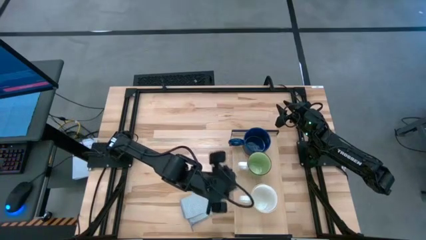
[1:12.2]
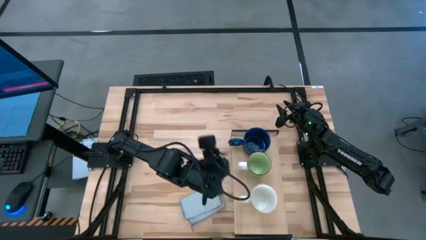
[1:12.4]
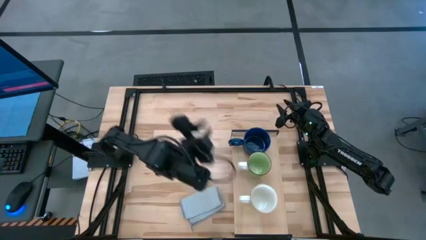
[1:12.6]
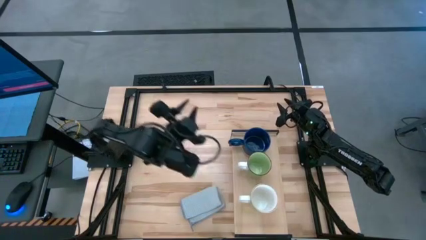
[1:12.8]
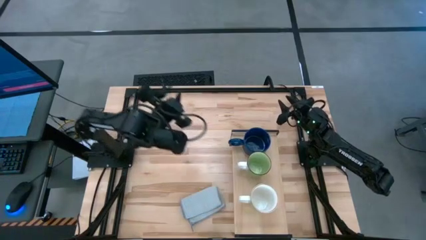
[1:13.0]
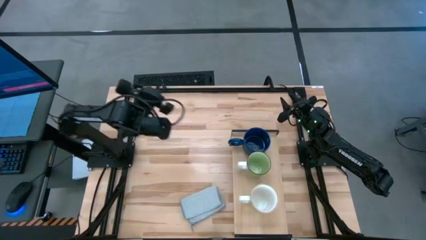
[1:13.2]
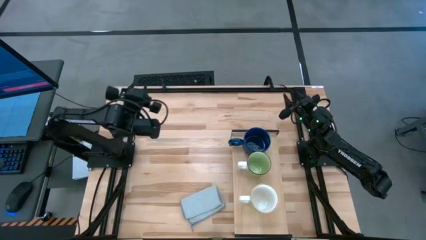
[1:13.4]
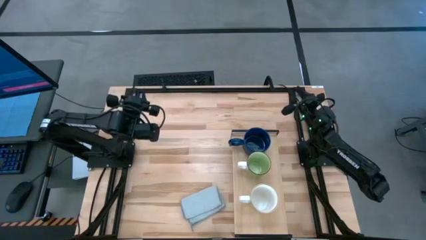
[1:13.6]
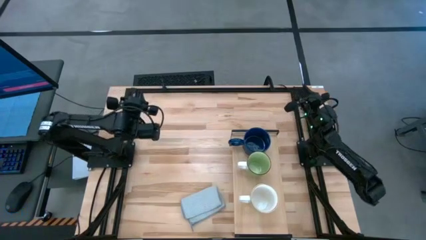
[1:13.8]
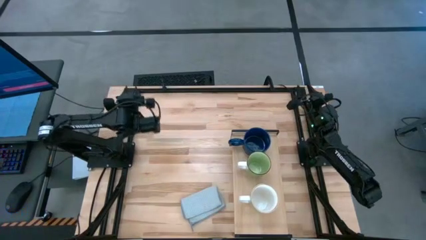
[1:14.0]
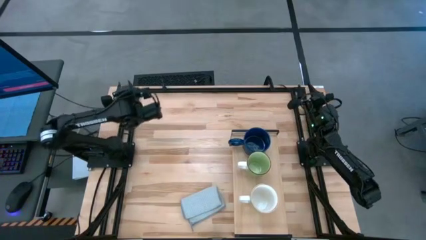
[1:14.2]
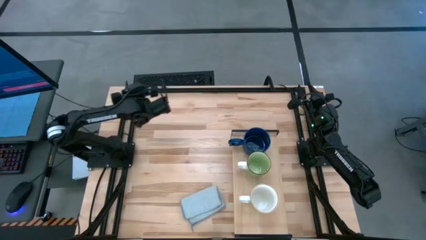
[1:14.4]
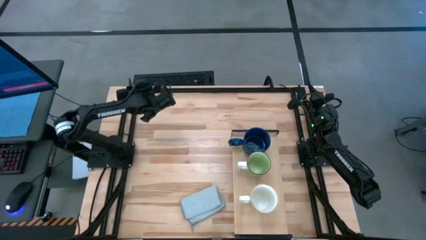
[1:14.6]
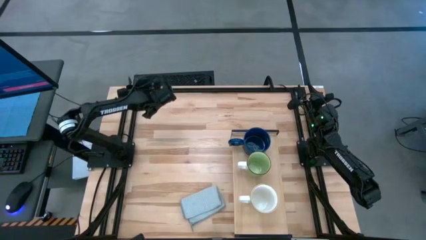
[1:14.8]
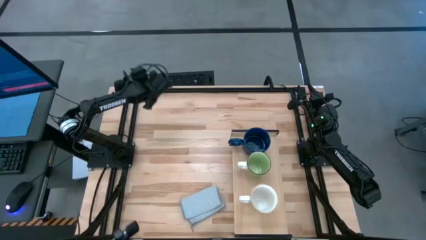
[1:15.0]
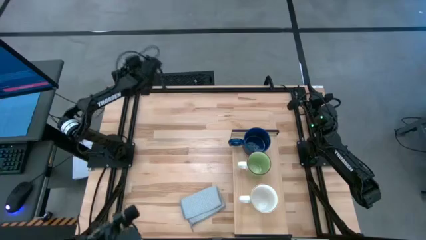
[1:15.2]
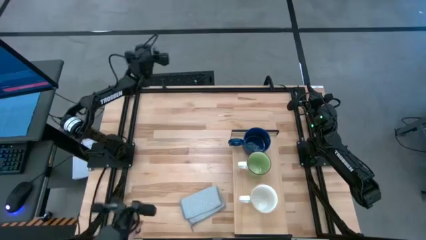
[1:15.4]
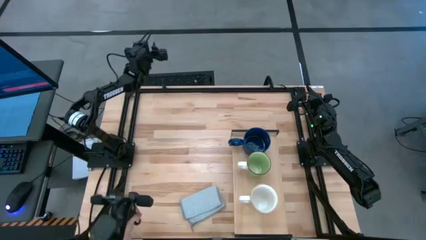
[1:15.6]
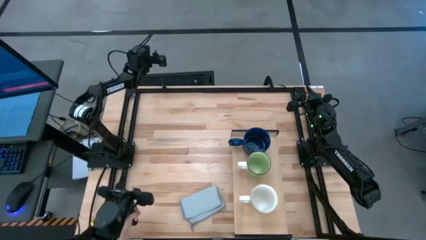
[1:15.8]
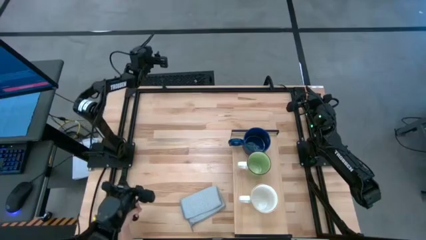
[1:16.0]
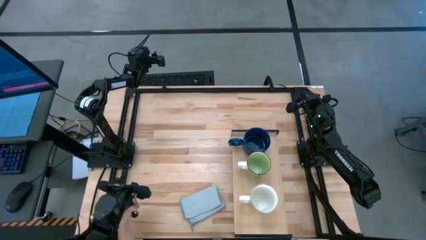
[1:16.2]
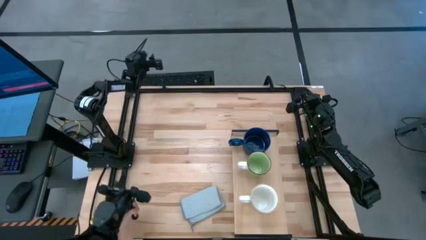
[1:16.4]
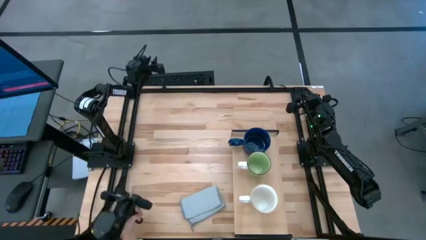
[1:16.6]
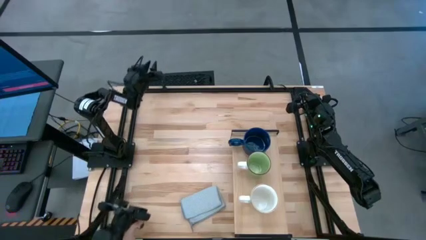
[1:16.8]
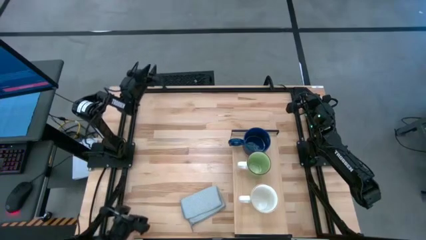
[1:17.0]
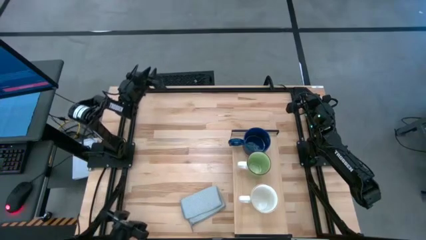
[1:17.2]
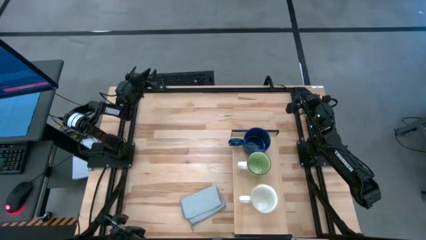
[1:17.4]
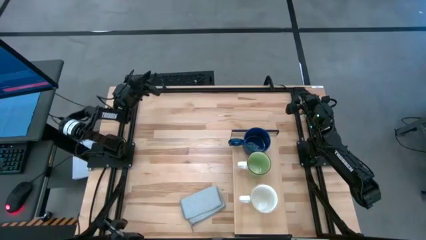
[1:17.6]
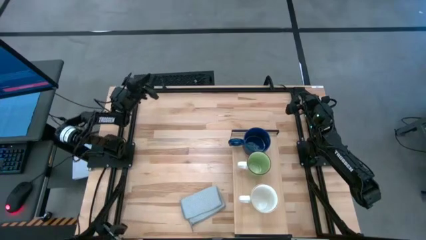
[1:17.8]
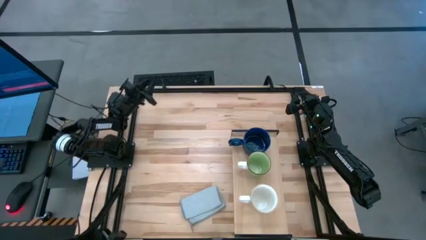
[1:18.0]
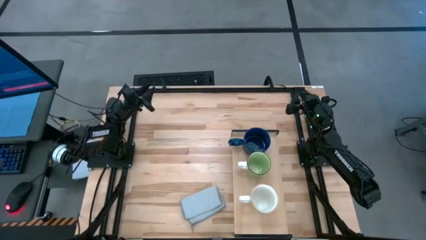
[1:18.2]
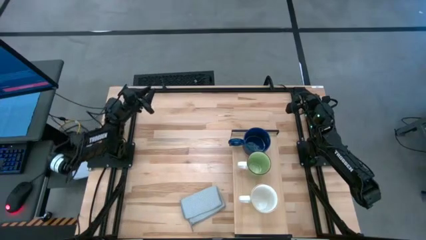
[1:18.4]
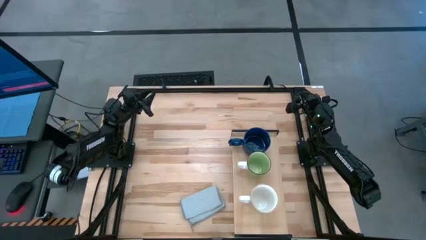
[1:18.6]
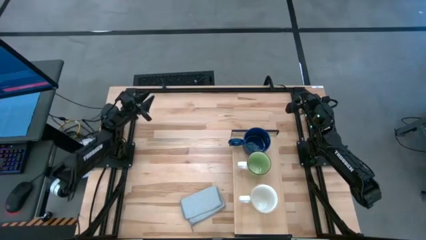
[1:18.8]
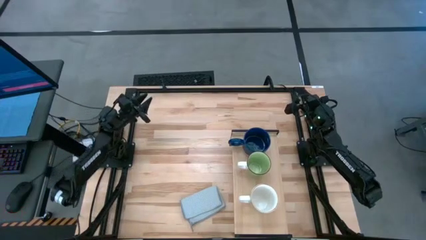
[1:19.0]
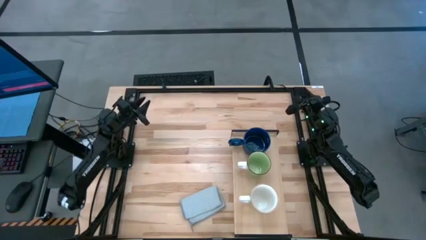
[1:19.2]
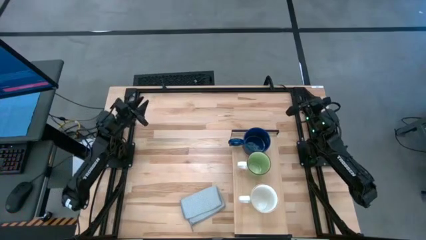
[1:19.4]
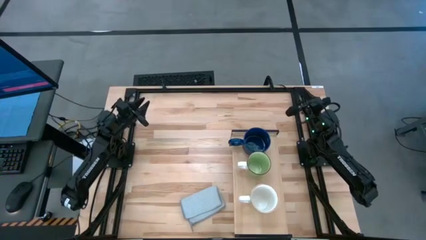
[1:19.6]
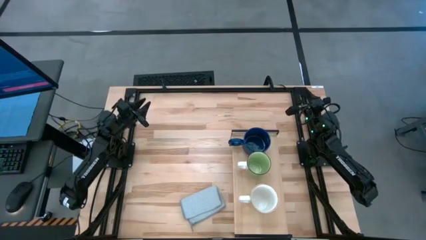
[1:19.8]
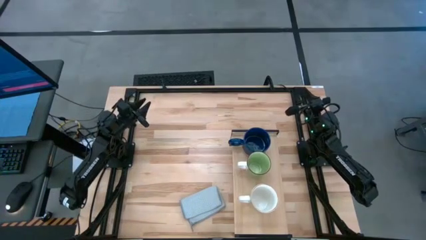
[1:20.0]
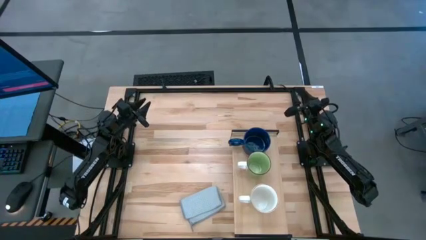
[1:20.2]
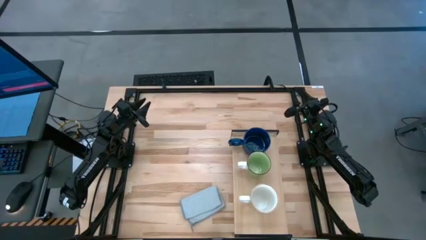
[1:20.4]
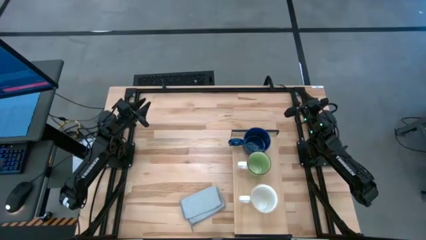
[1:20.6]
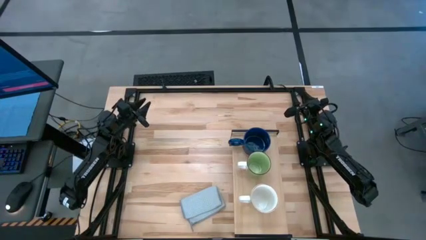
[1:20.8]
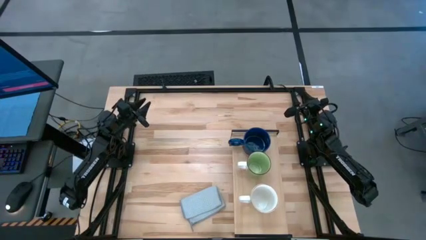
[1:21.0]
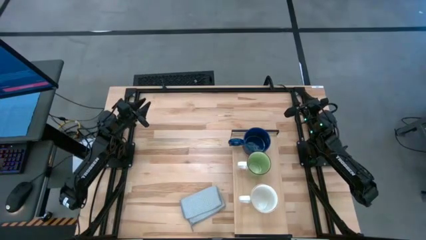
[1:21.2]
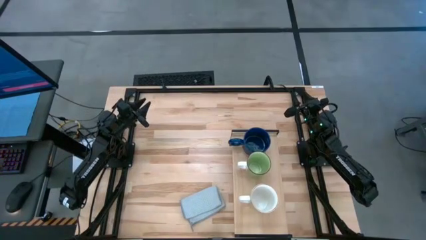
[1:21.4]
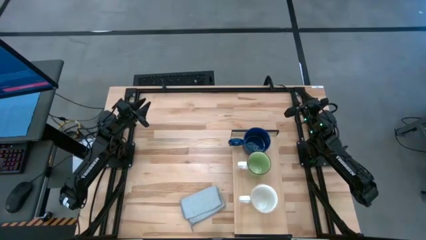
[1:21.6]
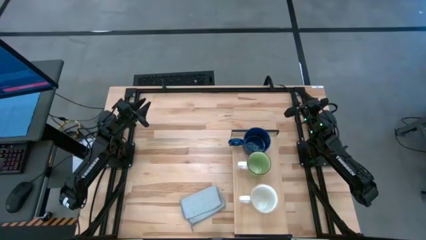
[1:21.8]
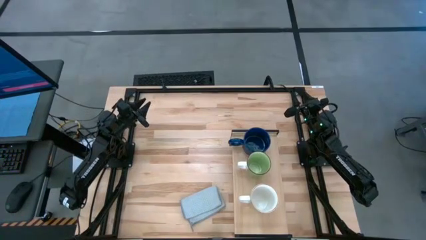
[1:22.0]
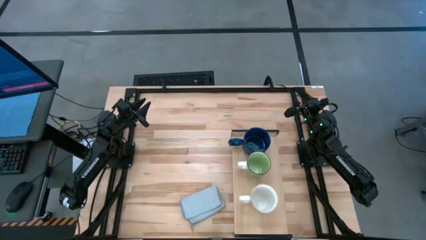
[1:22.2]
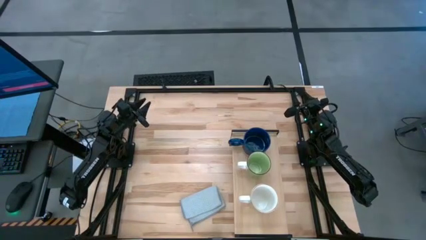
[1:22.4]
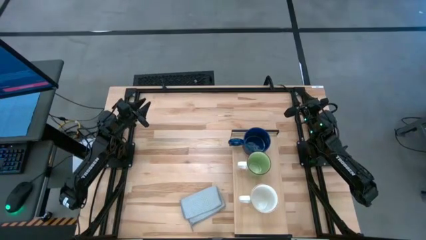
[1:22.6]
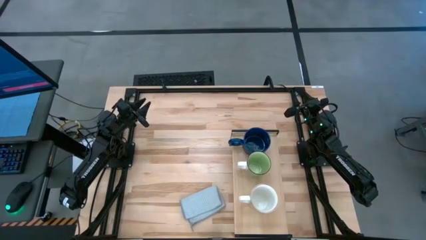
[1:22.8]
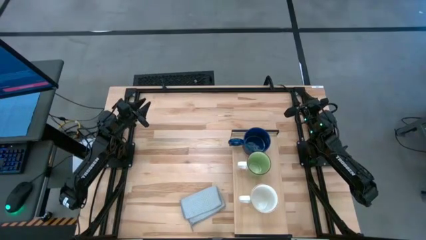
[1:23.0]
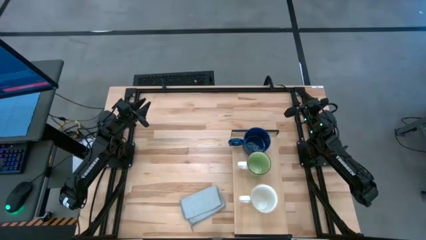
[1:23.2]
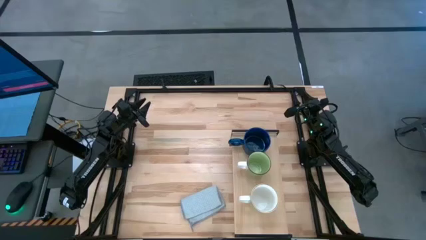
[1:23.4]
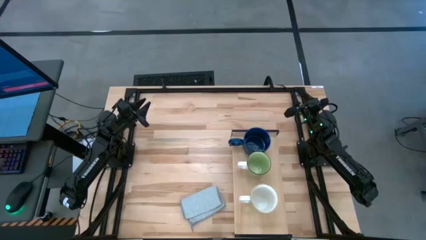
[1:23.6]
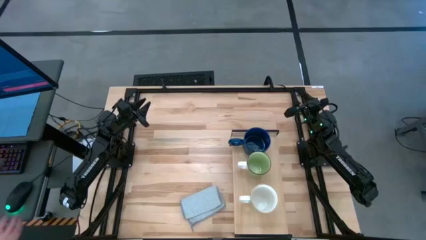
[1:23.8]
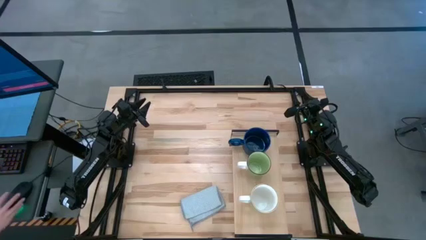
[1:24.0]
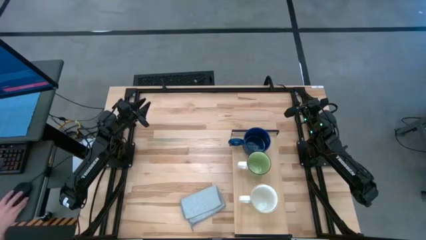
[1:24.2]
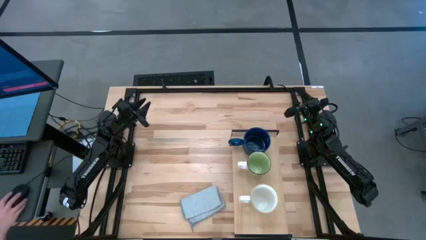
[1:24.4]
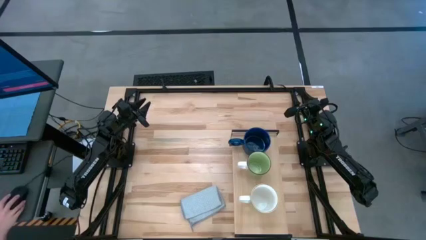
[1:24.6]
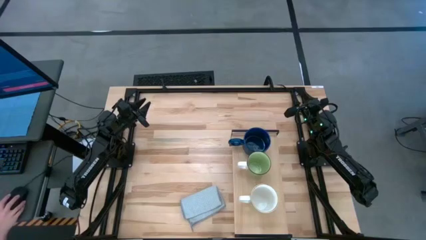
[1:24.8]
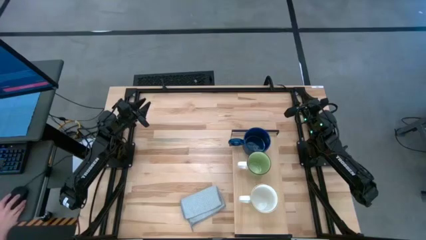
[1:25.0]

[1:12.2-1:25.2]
Task: Stack small to large cups/mugs on shelf
Return to Home Position

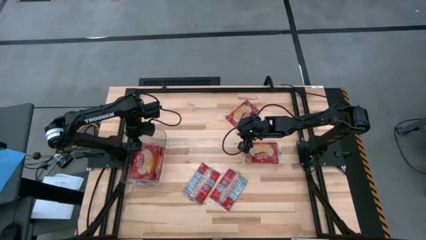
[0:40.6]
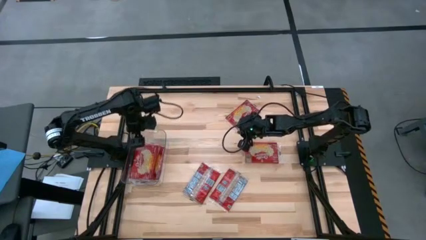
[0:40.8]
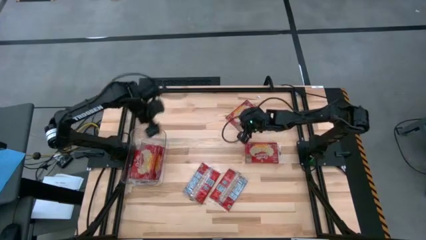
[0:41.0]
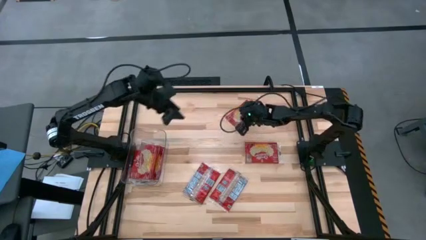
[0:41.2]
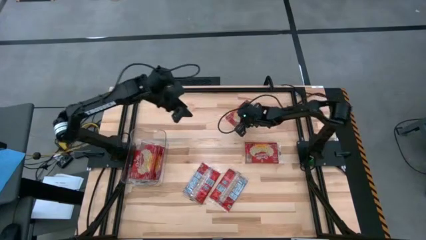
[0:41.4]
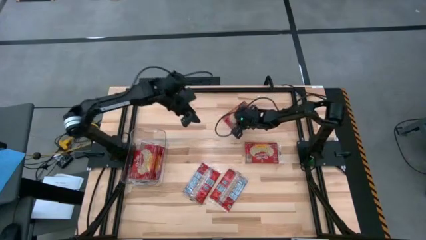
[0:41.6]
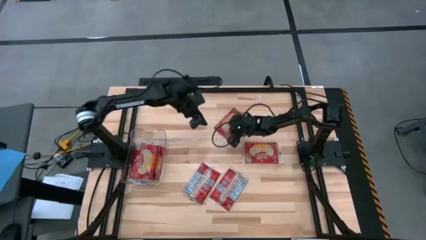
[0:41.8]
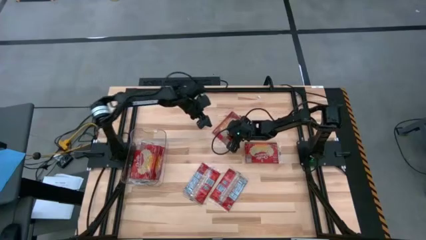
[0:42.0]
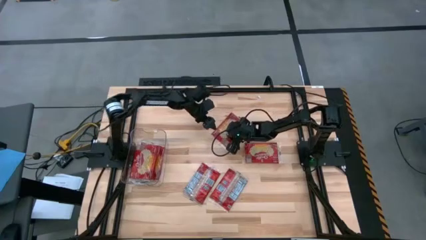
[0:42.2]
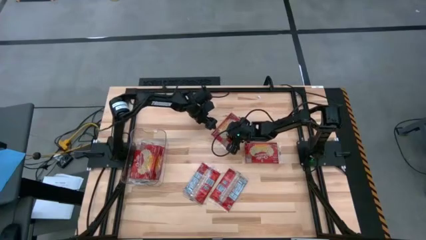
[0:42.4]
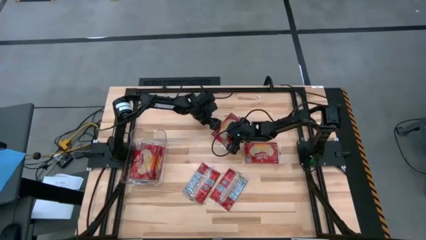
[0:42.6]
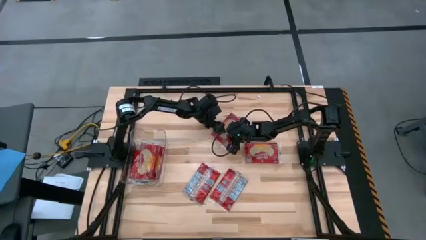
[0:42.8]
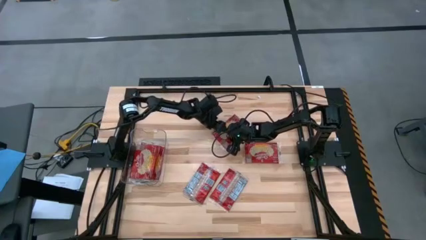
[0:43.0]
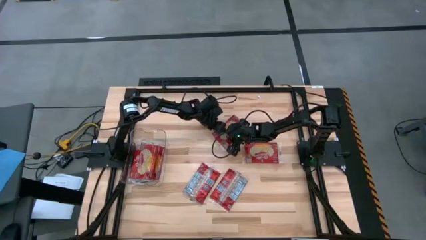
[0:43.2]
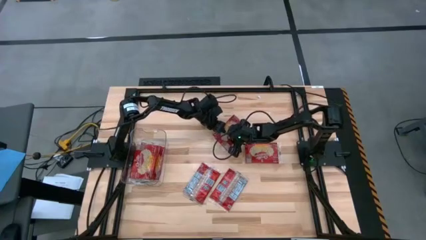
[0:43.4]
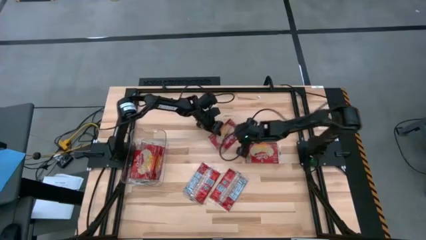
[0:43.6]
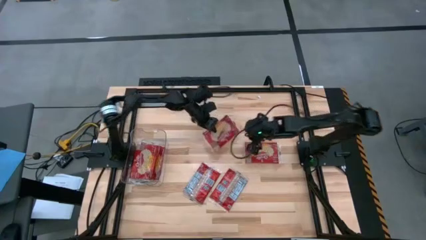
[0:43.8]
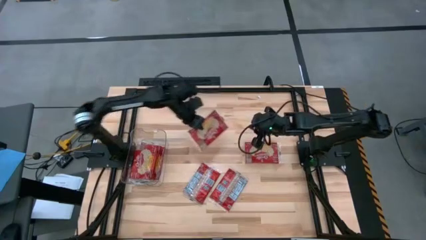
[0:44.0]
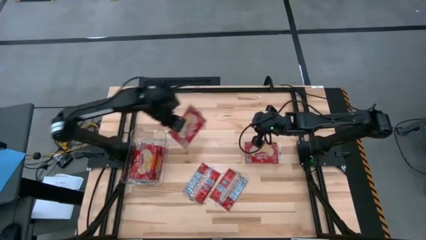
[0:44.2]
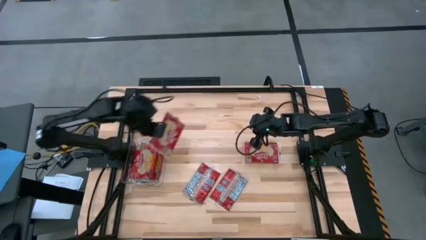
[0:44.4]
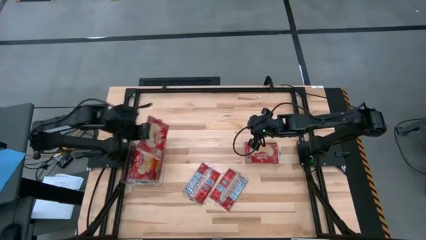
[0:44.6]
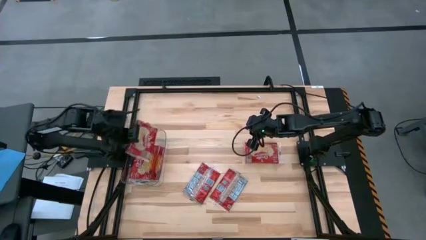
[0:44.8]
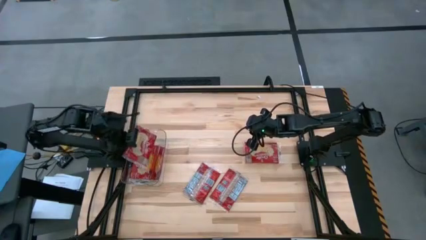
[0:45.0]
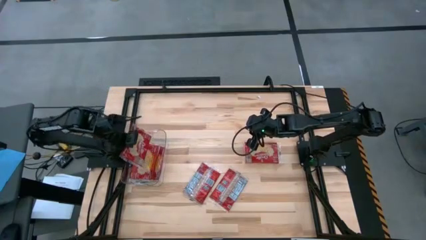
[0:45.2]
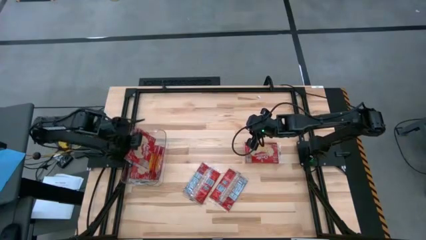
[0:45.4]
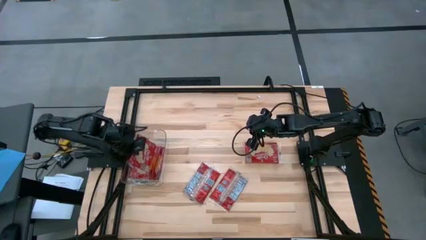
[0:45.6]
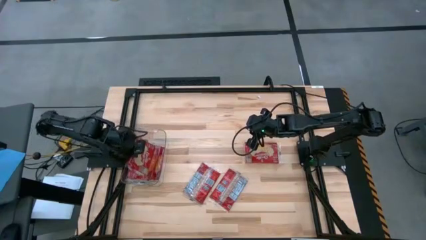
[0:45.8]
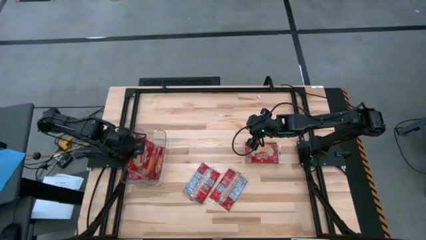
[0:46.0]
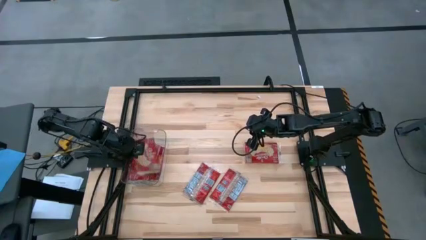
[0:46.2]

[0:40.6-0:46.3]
Task: Sort popcorn bags into baskets
Put the red popcorn bag into the transparent bin
